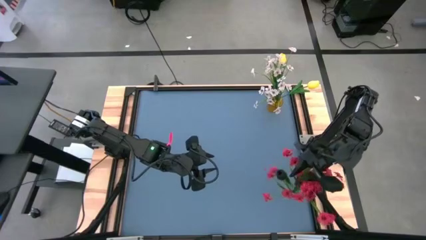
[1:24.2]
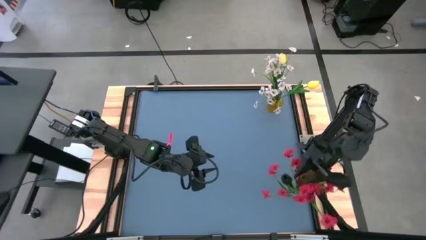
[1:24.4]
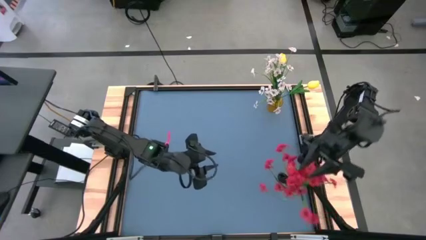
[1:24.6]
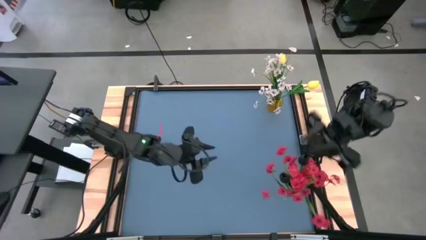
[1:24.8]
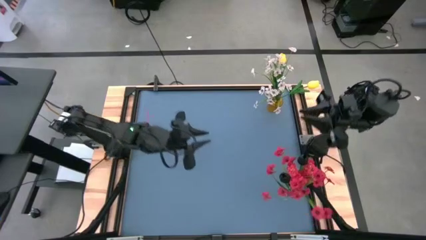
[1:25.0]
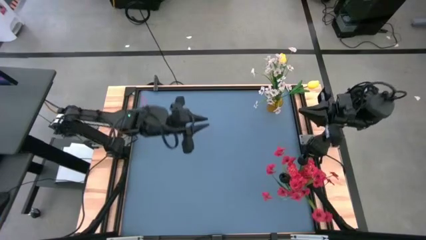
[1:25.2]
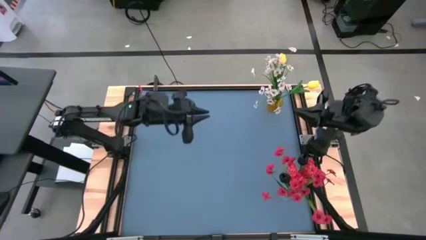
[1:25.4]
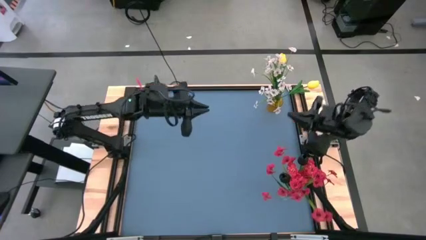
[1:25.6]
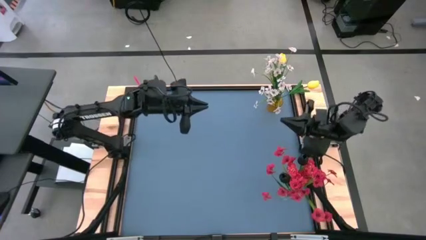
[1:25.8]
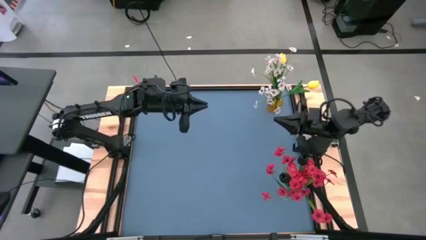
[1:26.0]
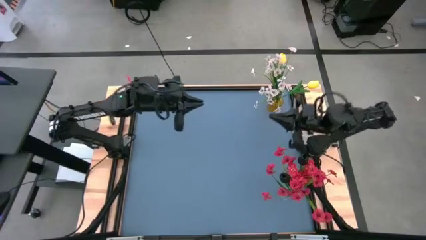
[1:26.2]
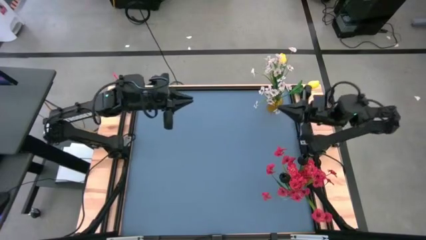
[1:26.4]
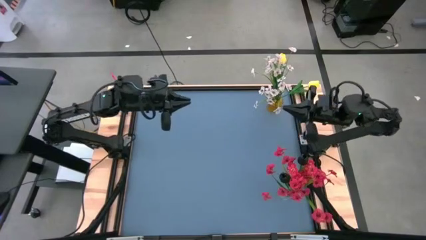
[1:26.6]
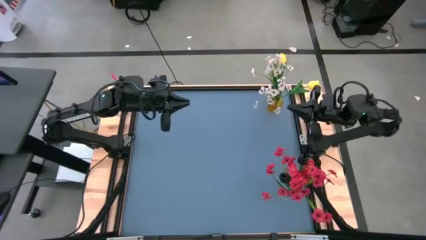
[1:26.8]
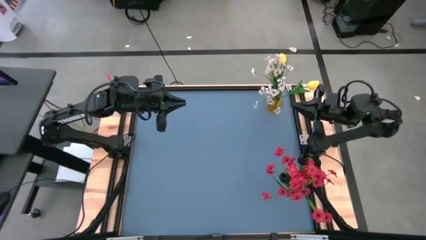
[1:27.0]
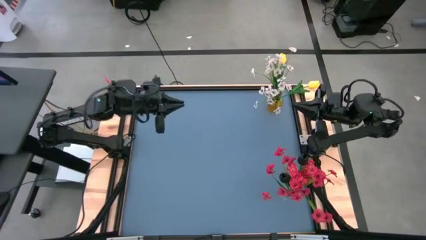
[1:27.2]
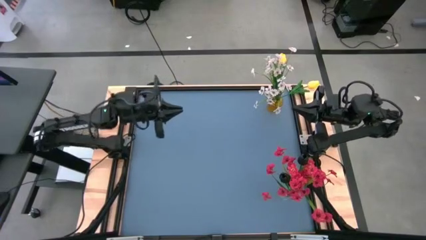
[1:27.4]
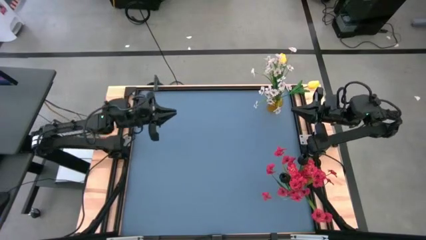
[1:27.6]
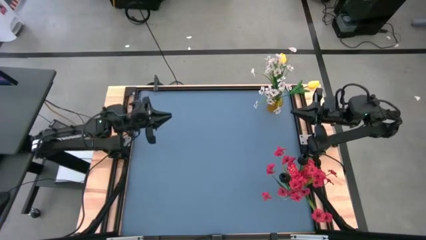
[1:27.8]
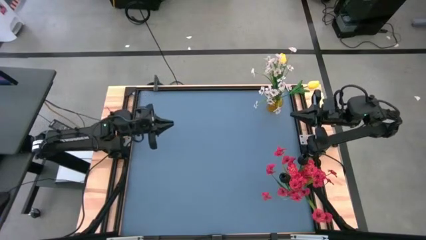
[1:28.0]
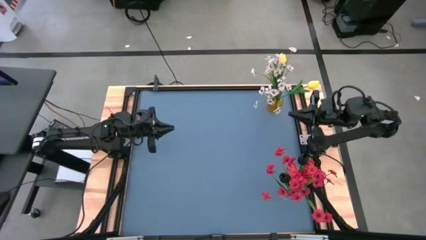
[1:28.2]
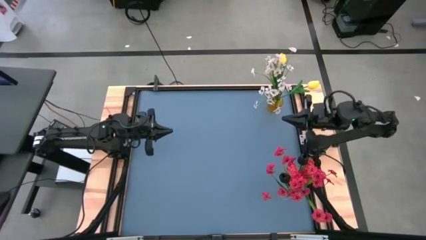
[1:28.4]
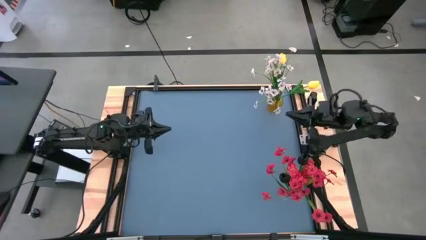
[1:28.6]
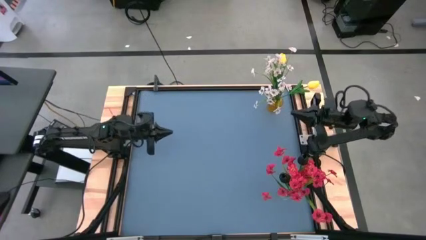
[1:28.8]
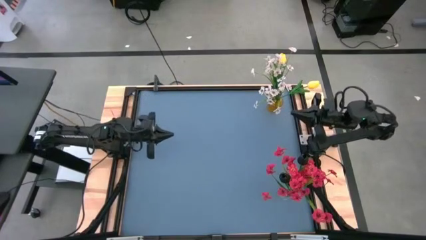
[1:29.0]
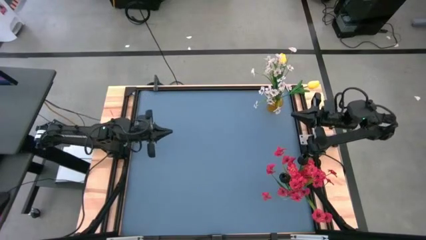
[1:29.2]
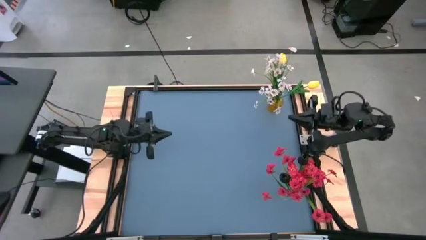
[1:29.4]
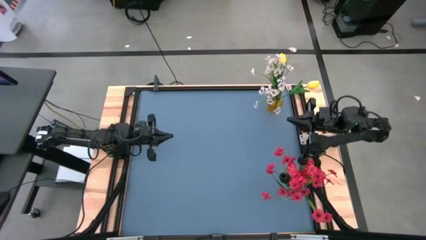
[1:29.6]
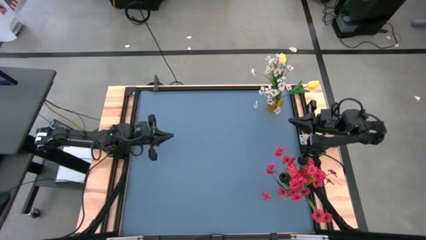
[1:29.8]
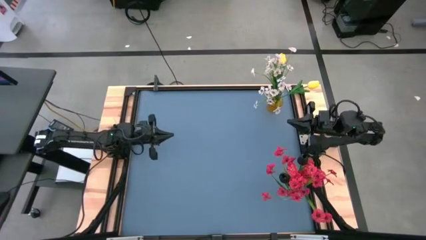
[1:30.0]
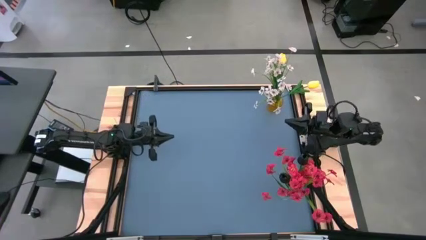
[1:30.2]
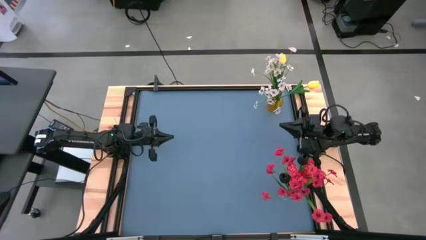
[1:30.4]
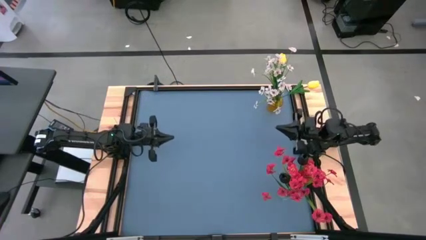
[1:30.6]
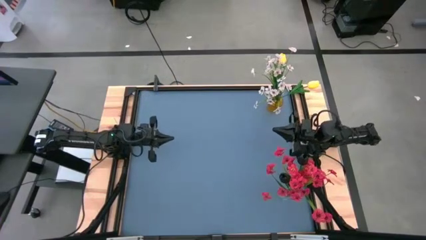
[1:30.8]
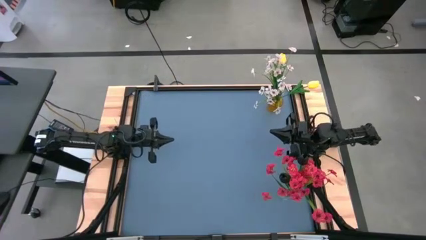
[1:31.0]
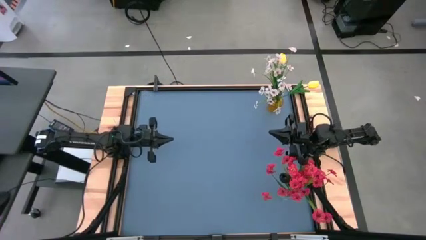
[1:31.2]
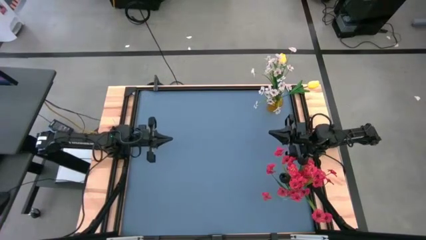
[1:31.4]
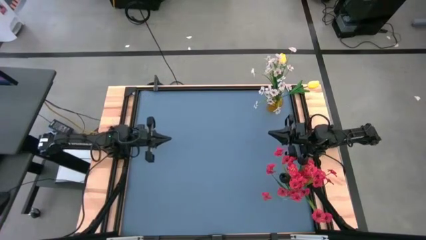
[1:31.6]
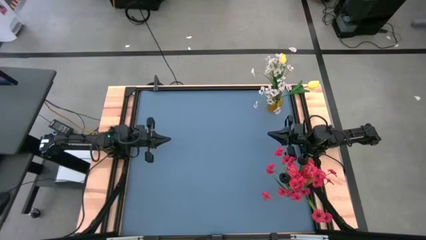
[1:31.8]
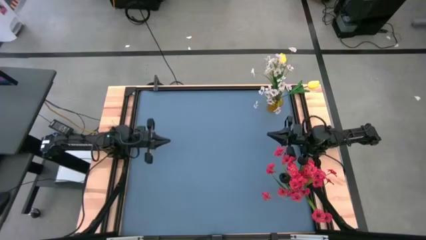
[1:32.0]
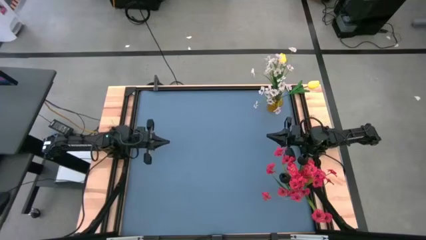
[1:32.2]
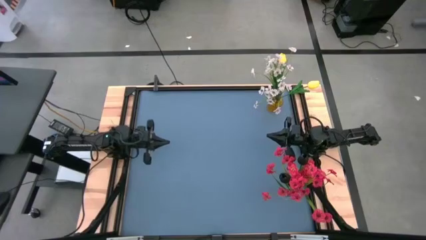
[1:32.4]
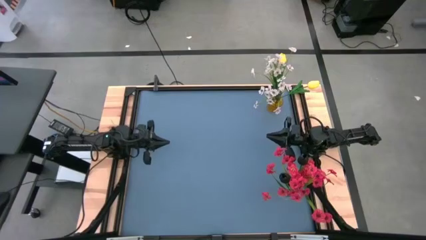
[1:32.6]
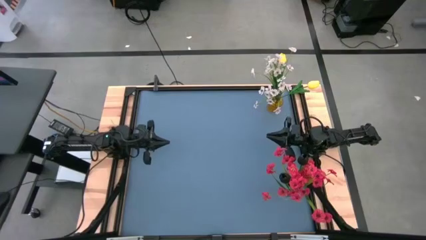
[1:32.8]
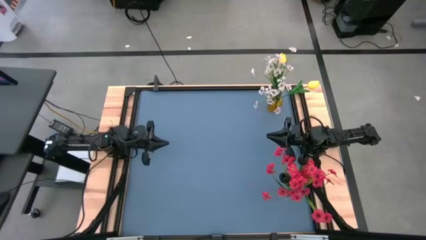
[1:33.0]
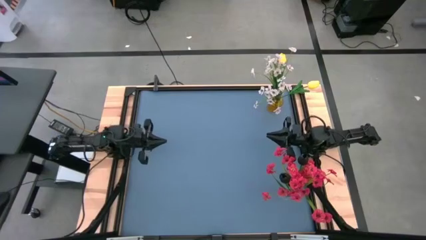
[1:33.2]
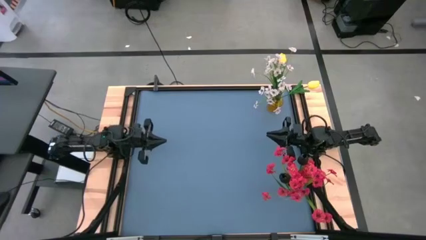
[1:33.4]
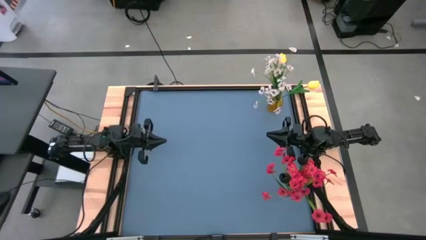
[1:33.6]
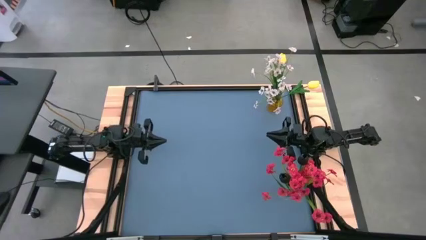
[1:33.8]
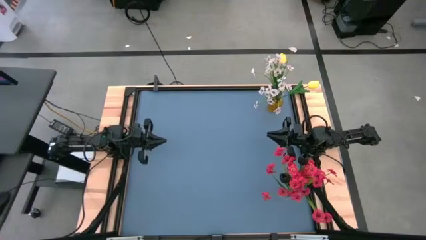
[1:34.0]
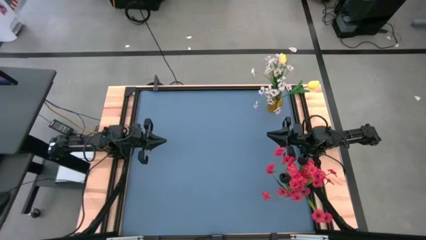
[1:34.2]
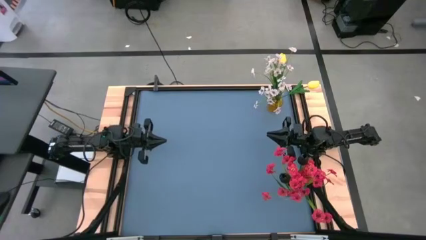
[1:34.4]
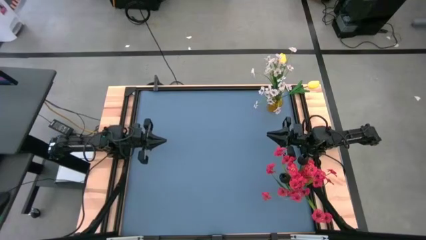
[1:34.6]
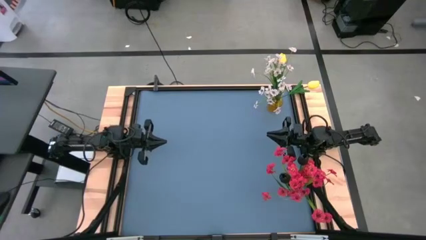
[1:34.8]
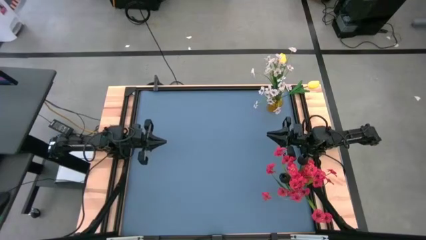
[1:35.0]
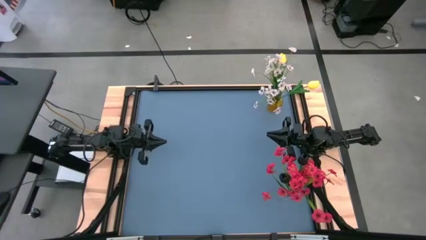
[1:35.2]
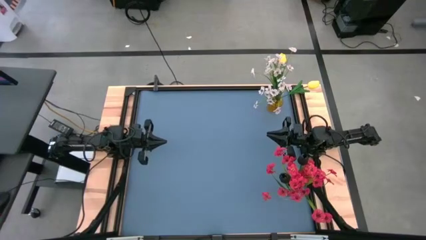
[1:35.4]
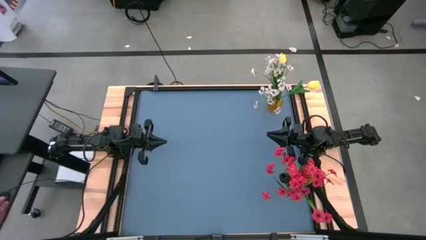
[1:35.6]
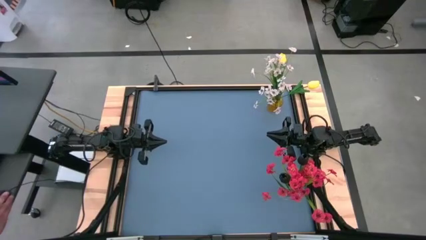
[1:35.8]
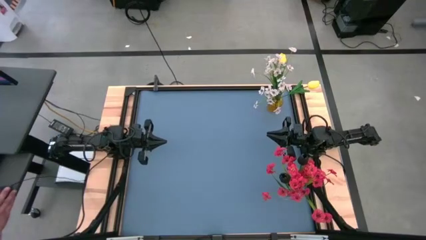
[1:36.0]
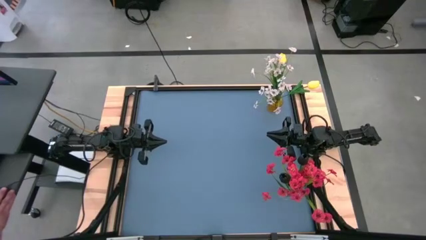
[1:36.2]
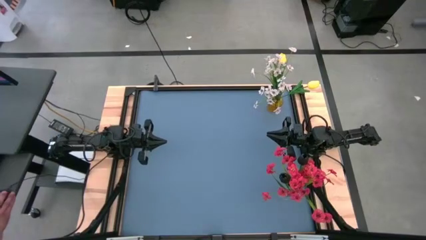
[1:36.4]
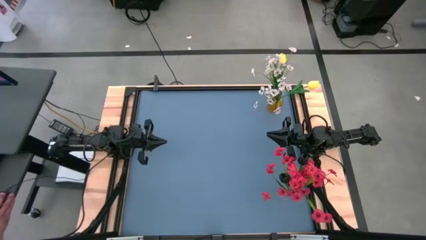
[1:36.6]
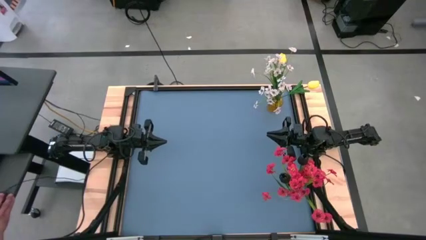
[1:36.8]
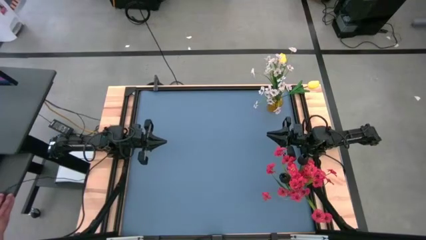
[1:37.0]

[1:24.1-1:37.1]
Task: Sort flowers into vase by color
Return to Home Position
